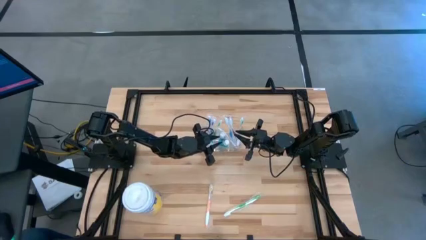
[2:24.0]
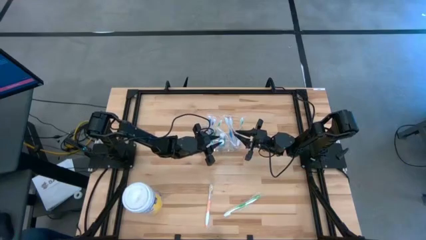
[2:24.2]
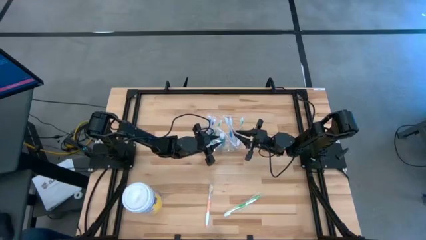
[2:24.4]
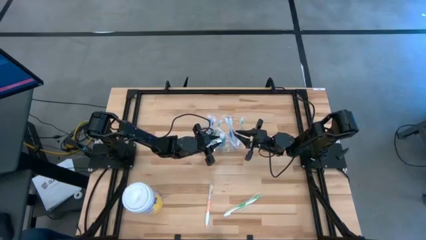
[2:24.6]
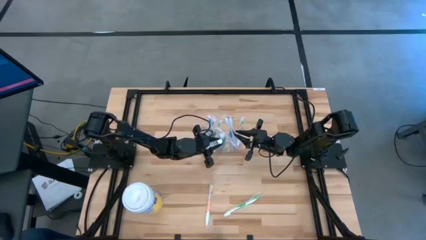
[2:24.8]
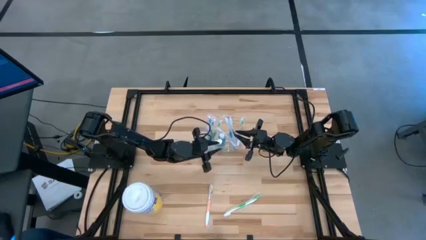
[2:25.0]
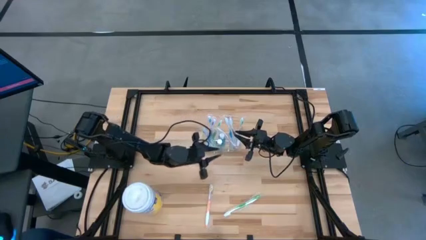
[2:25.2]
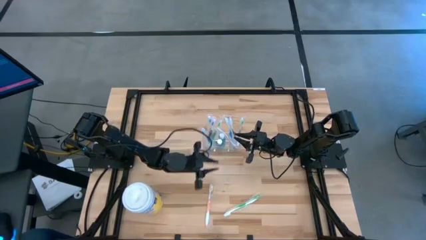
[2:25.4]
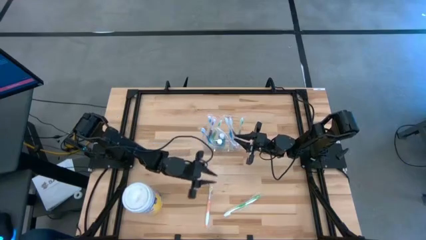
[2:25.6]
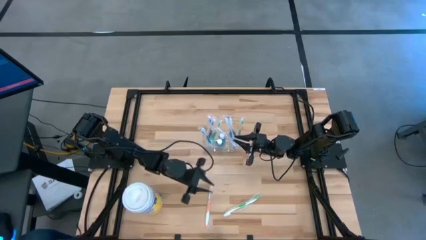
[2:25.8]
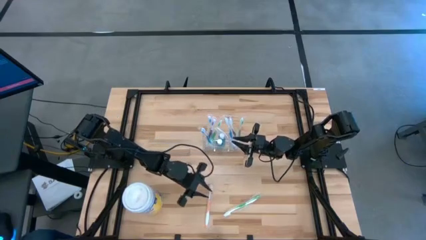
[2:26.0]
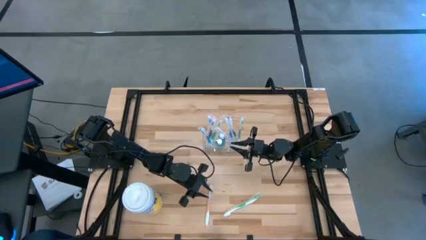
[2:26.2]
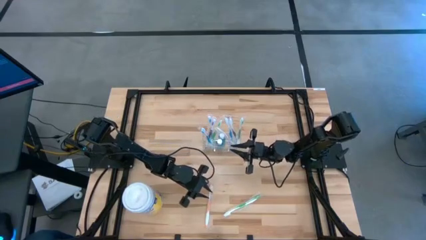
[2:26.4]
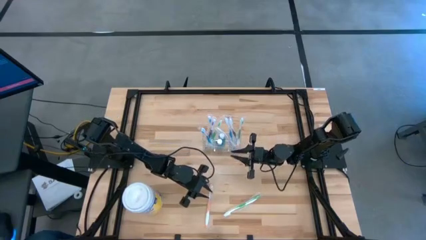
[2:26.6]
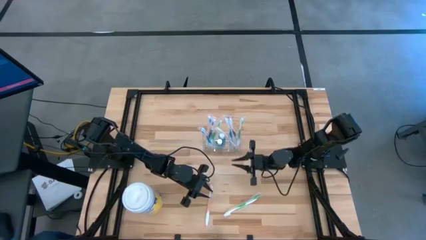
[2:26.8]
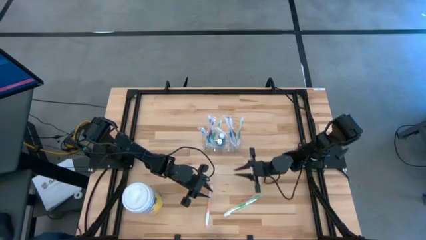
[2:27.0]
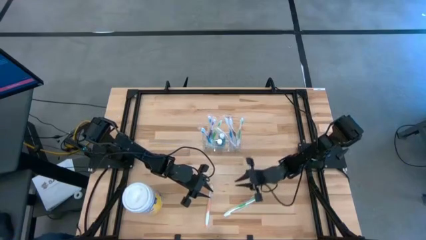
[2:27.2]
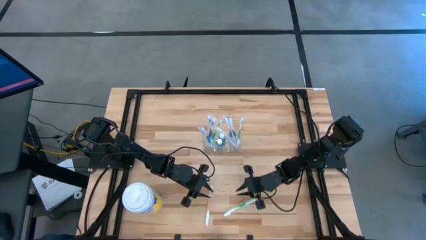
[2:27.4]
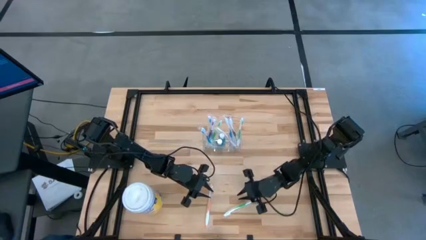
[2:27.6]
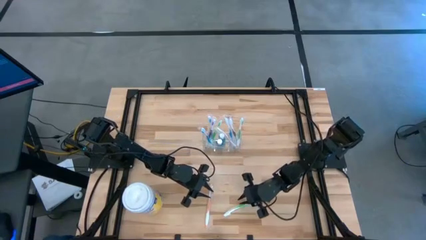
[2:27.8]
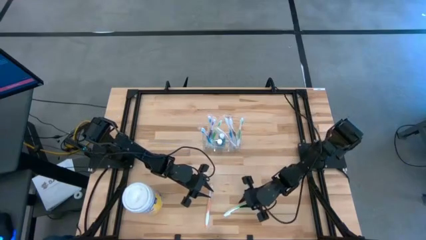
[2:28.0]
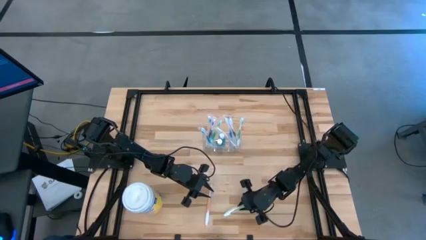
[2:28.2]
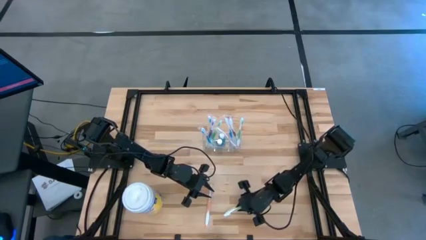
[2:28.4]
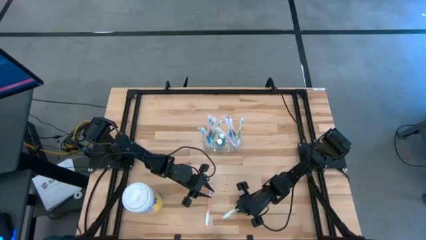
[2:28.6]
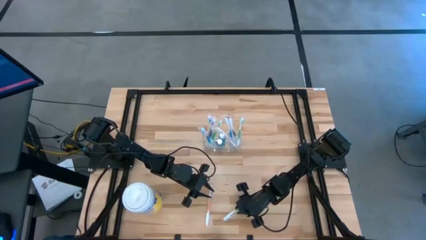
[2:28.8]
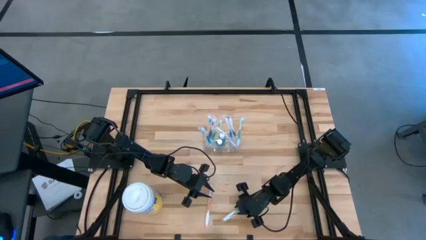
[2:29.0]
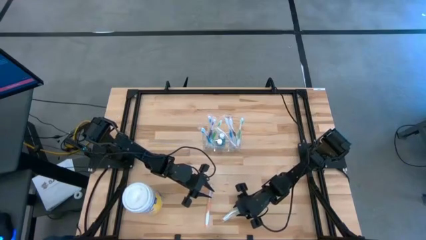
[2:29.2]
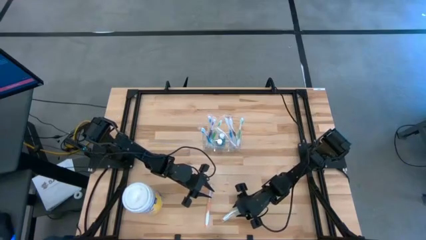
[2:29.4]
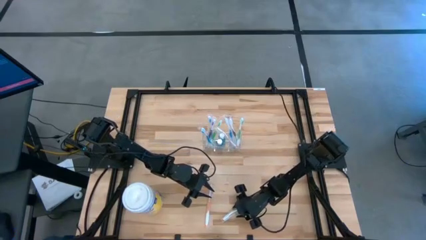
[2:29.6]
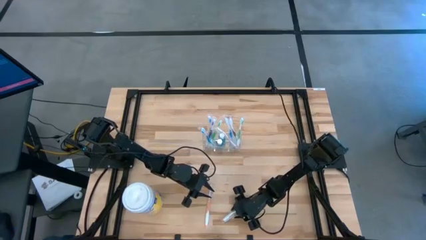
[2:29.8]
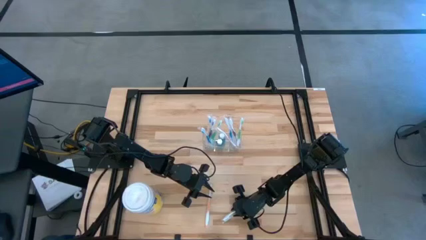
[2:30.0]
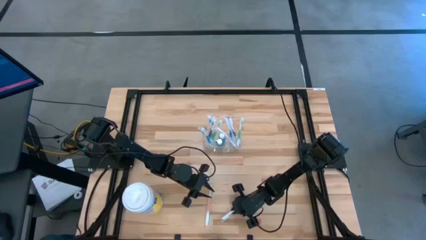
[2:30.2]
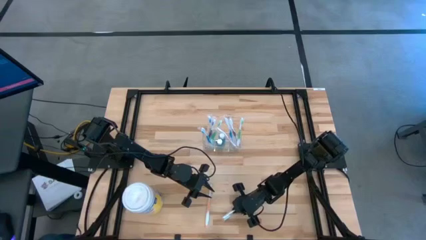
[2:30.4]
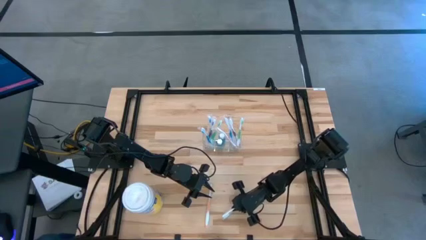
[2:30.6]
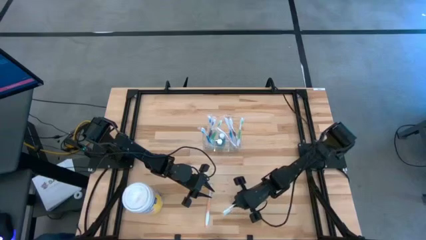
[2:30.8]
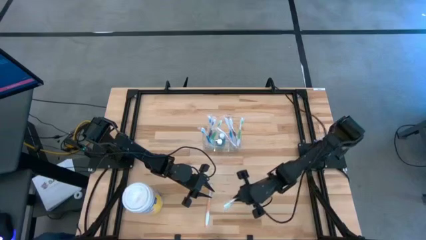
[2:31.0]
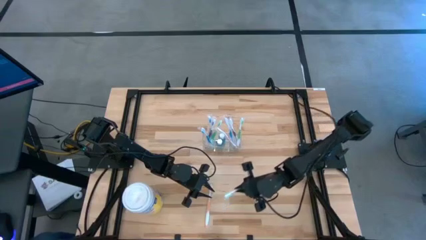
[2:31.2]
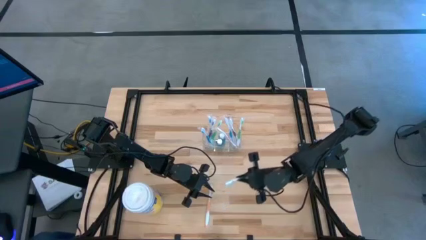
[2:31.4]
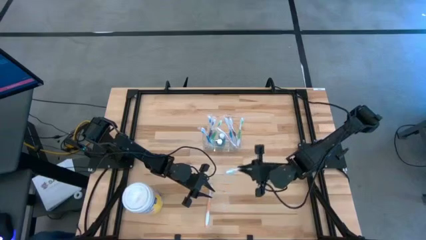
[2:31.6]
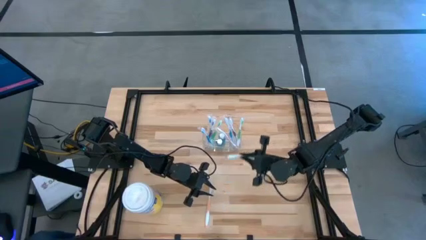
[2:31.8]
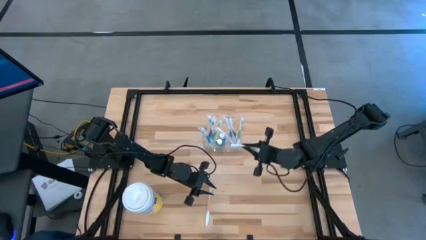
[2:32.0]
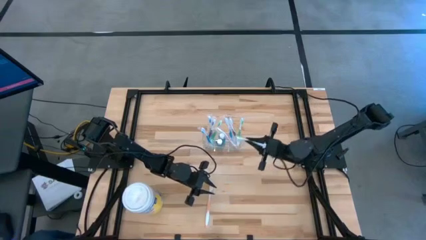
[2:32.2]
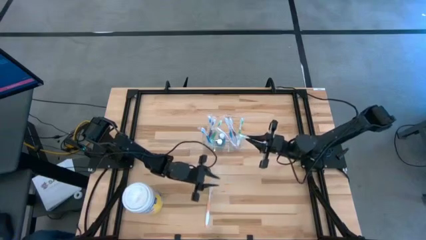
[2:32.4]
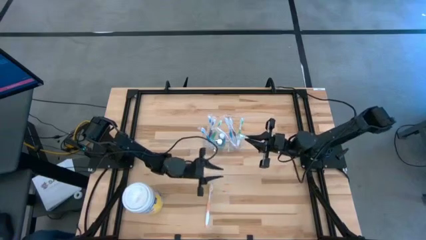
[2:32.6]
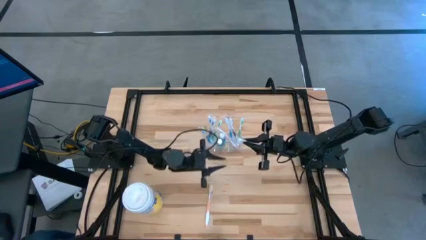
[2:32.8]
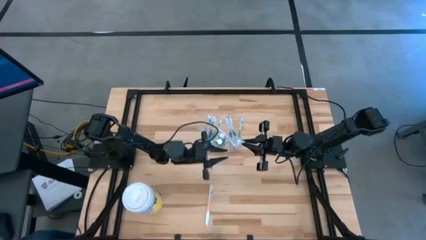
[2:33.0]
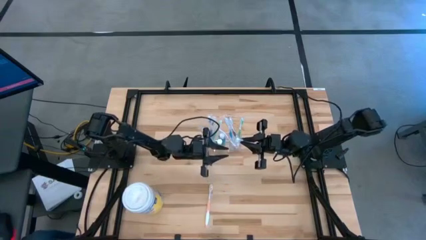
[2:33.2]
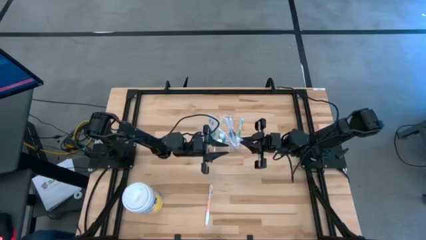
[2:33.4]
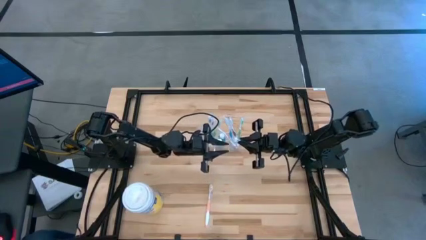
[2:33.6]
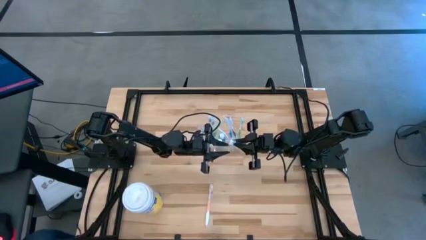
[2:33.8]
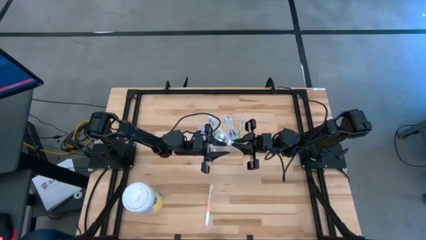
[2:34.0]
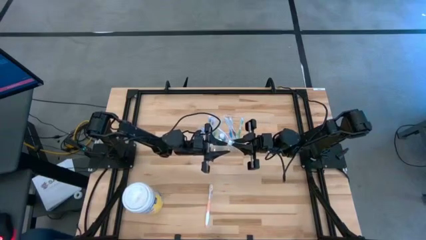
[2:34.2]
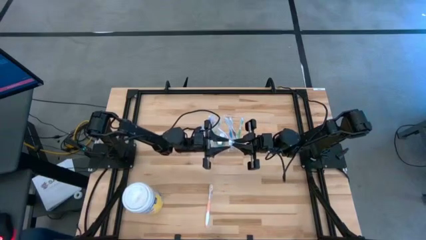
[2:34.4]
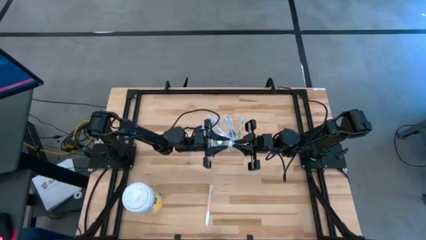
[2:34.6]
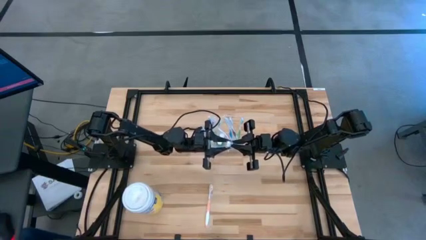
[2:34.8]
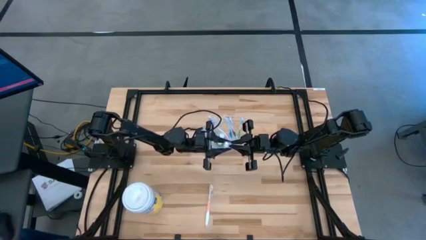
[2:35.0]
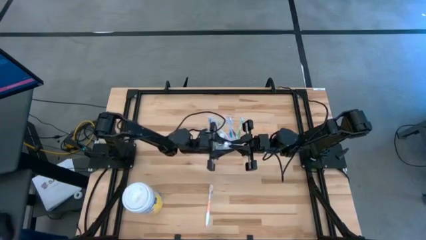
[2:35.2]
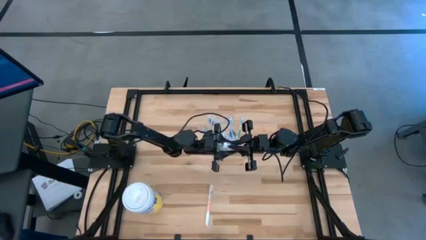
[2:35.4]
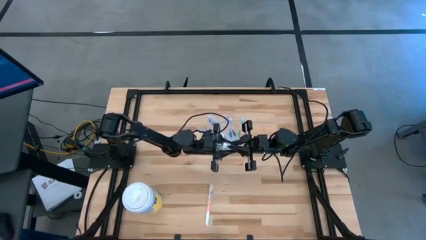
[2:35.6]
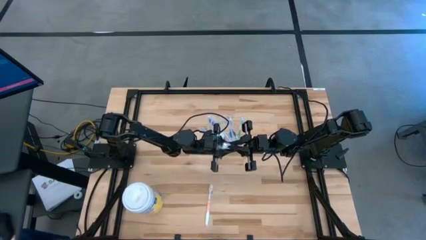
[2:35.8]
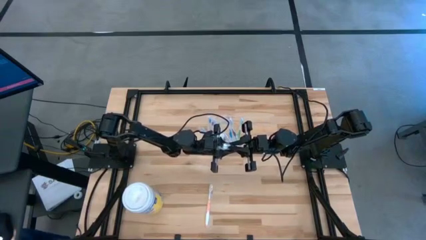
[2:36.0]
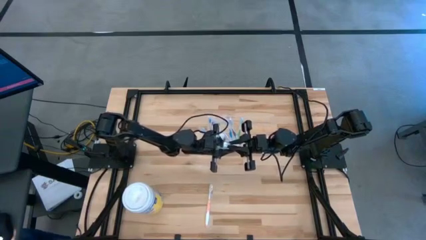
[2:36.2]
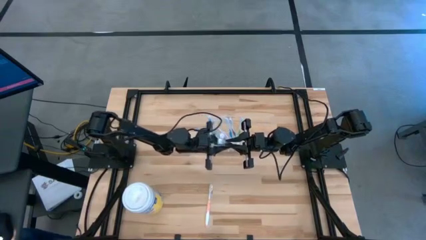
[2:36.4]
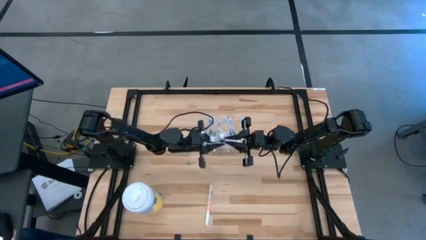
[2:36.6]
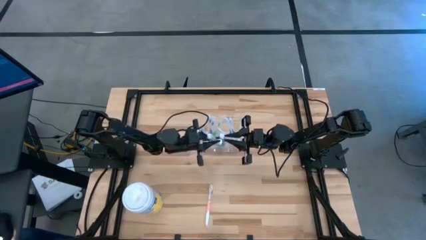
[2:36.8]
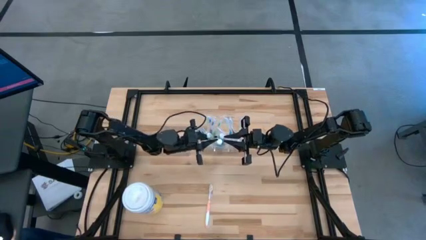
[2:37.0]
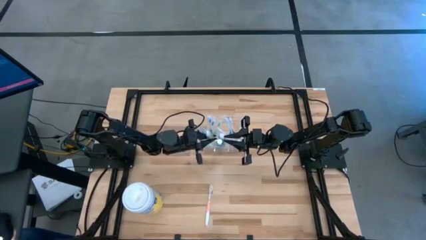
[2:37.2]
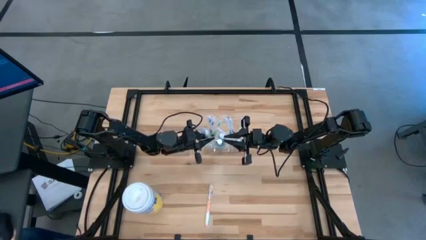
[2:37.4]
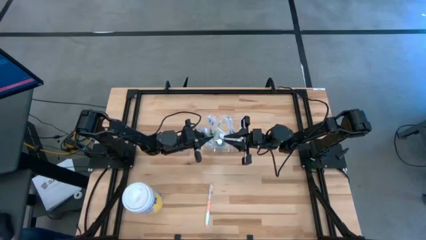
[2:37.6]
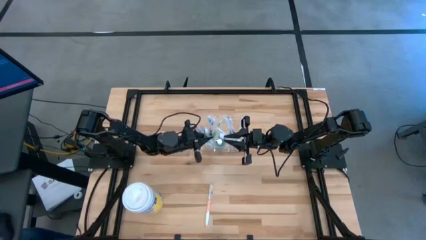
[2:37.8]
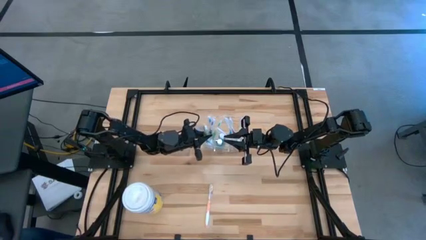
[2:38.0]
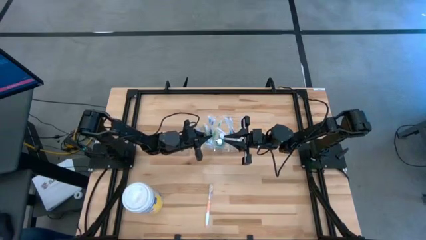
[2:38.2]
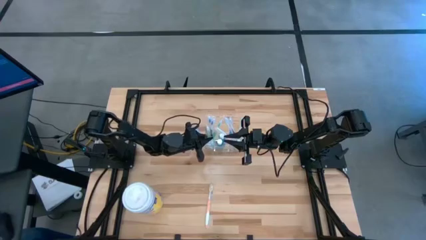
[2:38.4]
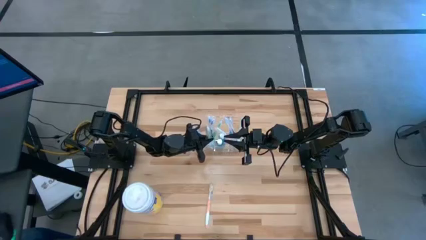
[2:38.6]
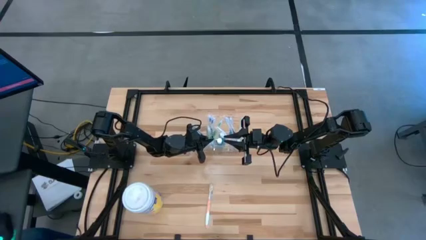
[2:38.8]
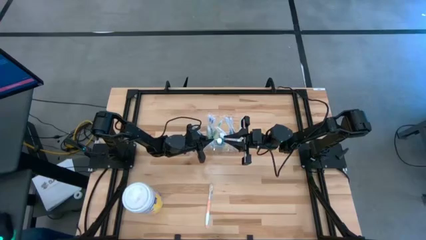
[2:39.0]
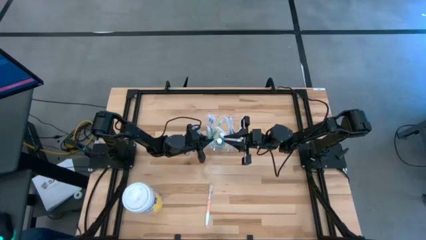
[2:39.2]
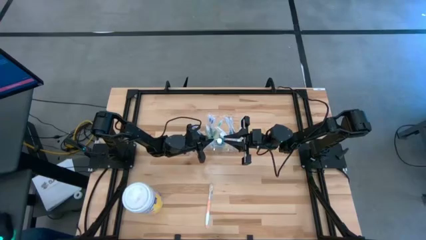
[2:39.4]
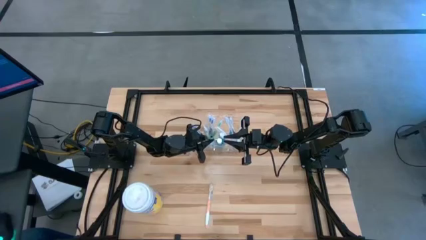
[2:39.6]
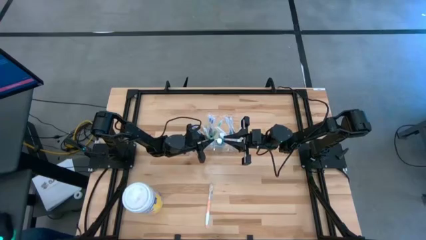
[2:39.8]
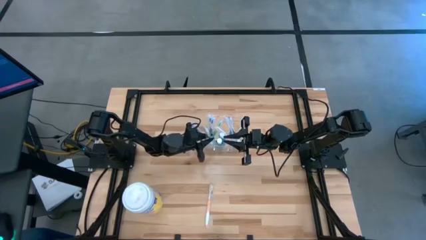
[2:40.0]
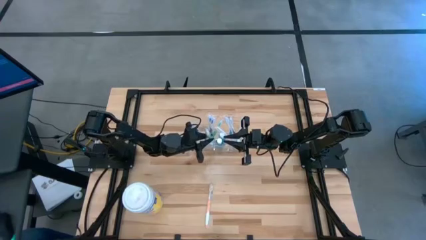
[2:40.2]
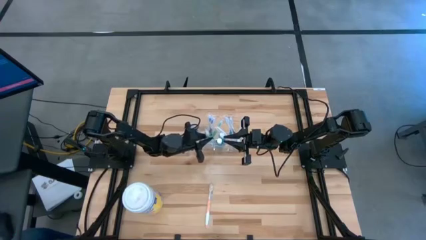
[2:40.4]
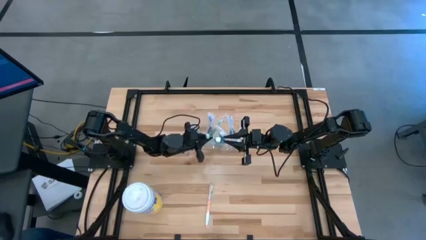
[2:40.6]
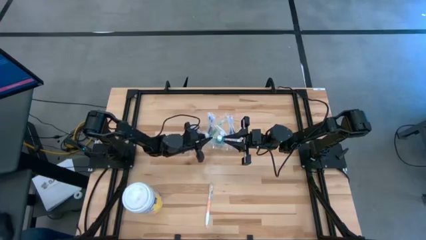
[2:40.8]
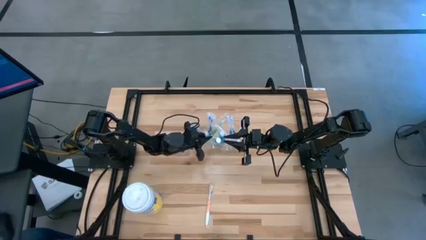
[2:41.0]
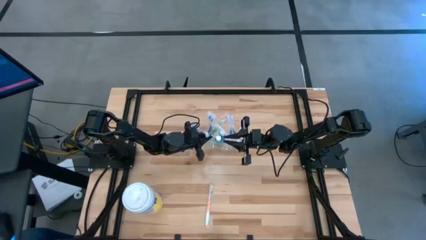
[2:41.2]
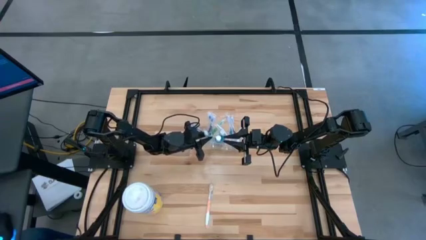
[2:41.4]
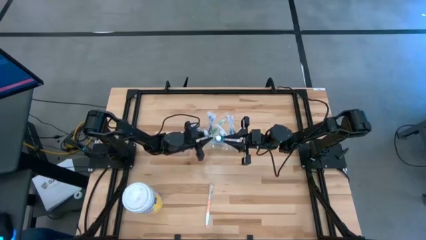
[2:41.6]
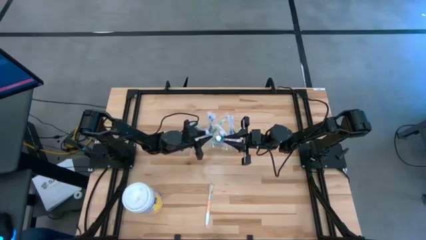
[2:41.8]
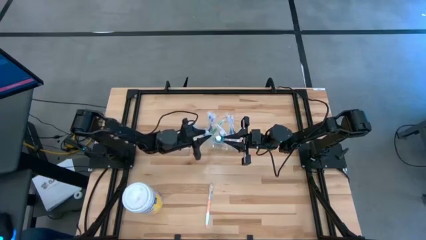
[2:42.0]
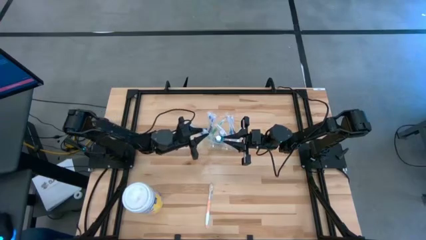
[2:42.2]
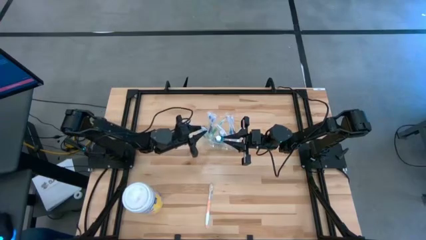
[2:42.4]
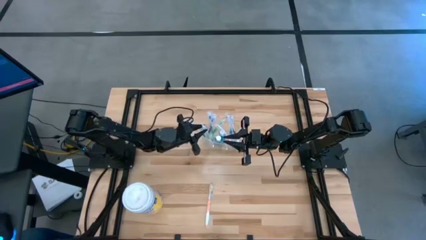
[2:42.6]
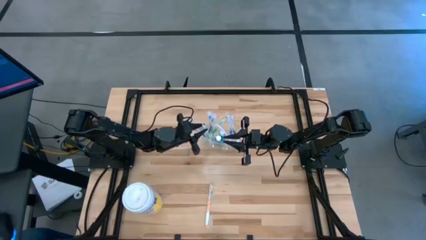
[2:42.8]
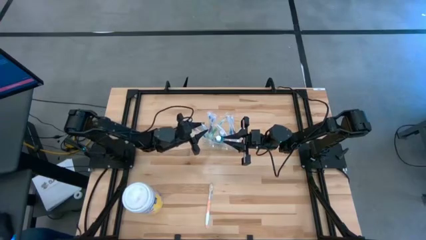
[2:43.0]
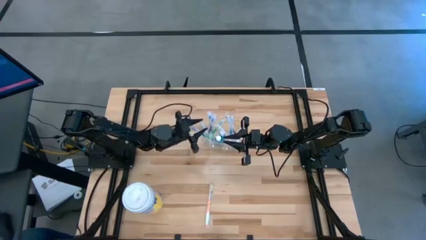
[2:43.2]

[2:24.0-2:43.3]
Task: Pick & Place toothbrushing station
Put the green toothbrush into the transparent organizer
